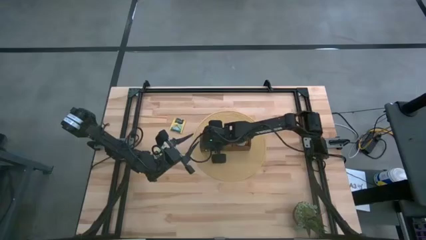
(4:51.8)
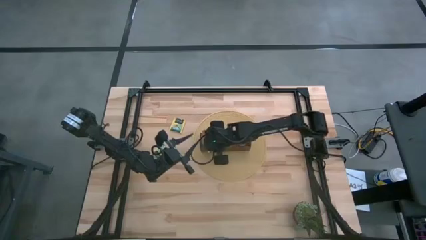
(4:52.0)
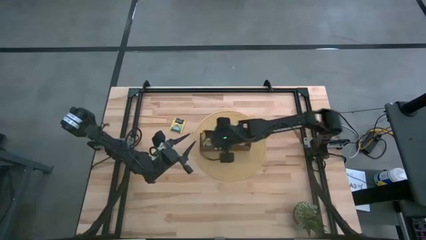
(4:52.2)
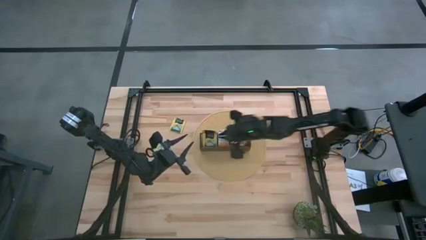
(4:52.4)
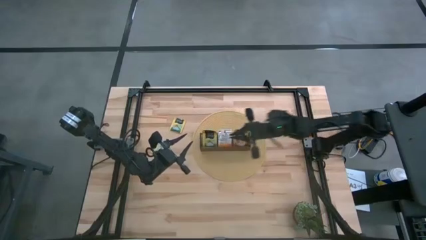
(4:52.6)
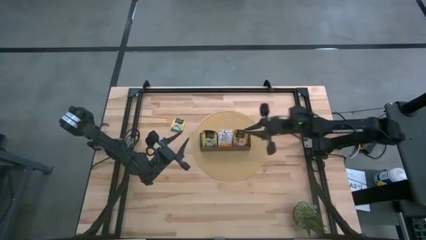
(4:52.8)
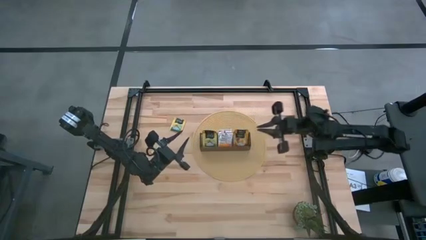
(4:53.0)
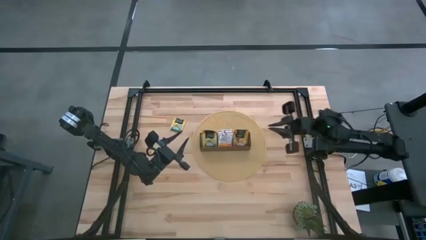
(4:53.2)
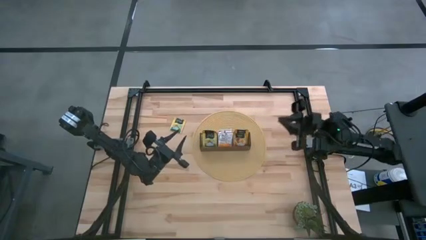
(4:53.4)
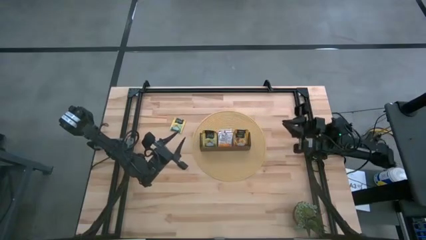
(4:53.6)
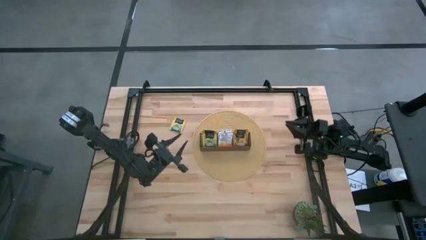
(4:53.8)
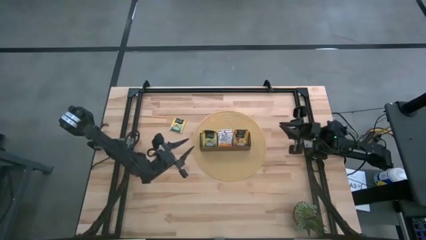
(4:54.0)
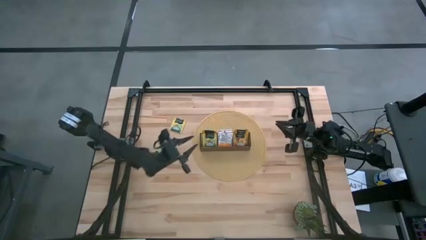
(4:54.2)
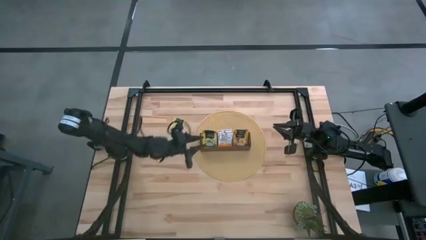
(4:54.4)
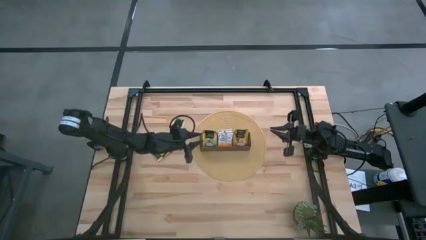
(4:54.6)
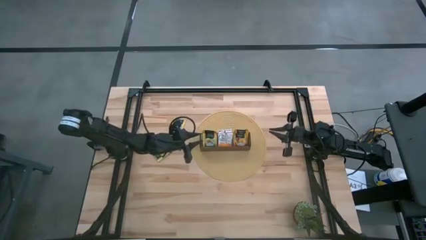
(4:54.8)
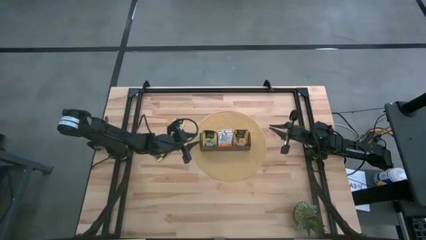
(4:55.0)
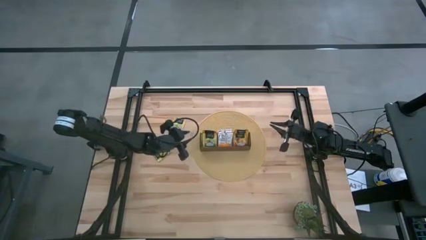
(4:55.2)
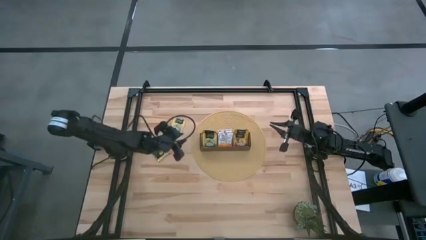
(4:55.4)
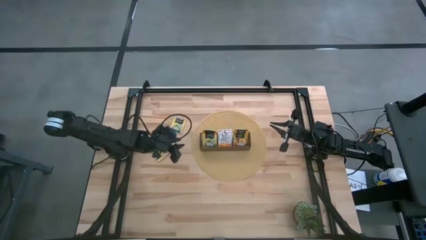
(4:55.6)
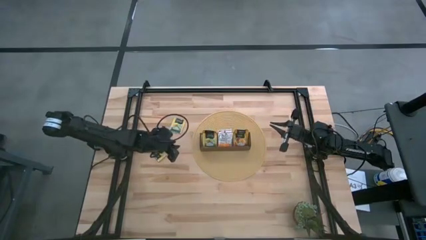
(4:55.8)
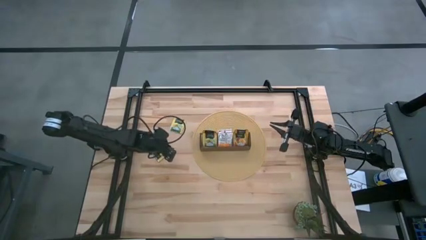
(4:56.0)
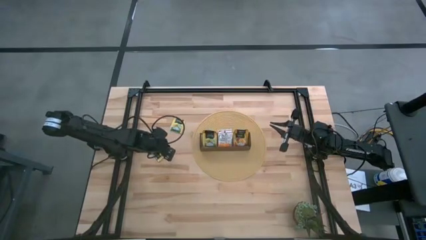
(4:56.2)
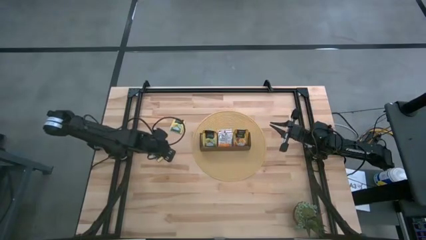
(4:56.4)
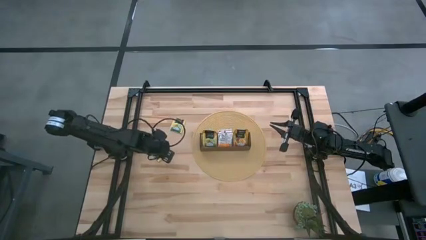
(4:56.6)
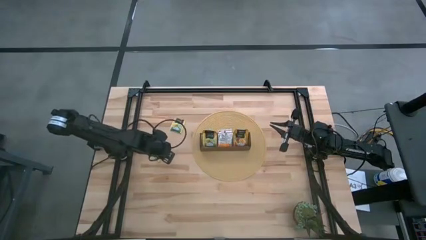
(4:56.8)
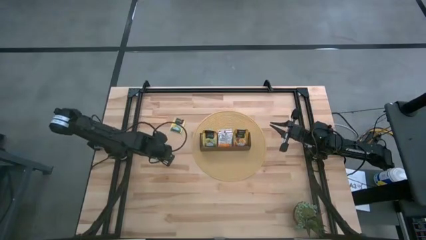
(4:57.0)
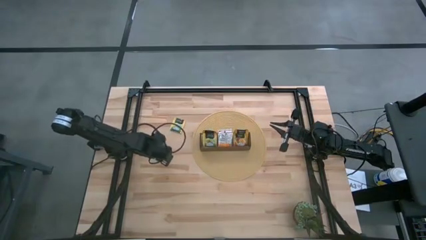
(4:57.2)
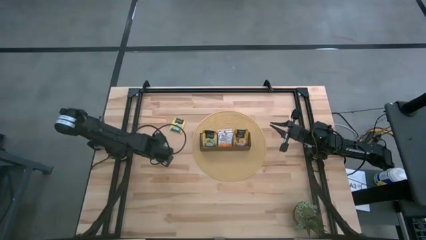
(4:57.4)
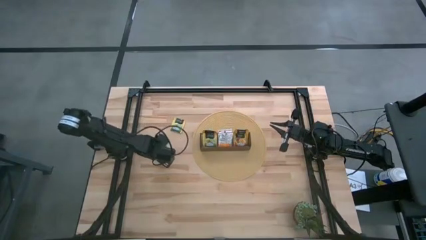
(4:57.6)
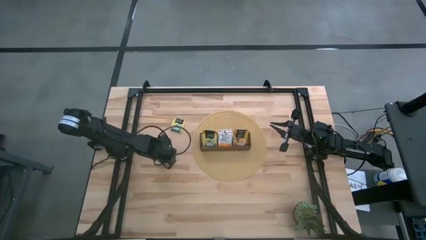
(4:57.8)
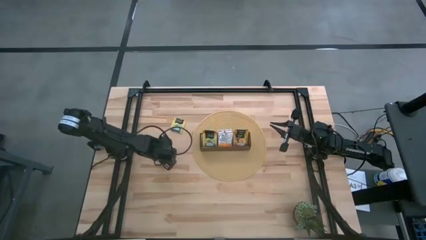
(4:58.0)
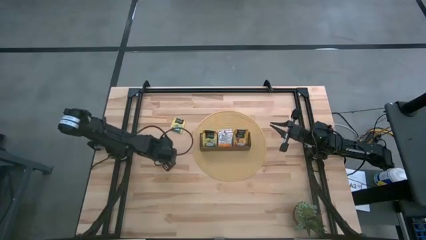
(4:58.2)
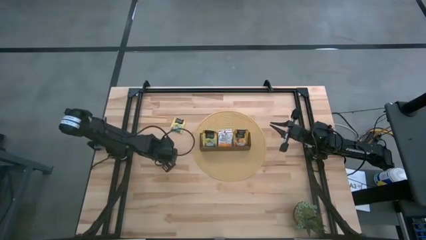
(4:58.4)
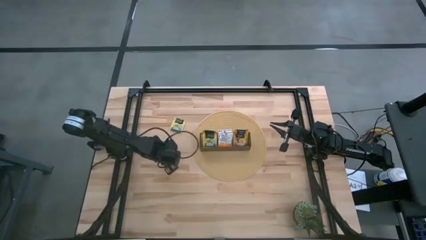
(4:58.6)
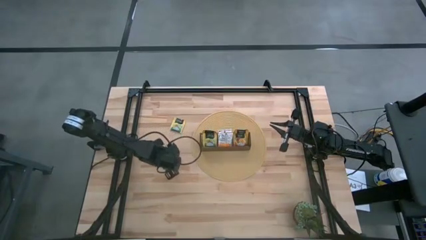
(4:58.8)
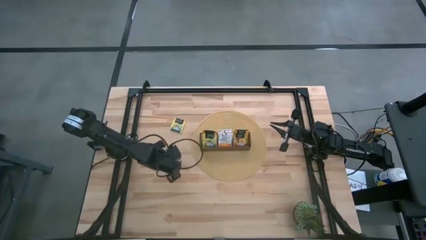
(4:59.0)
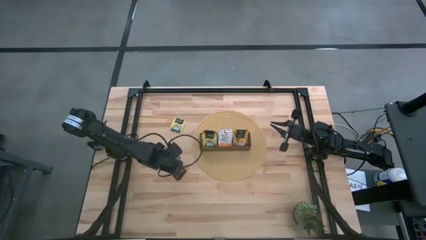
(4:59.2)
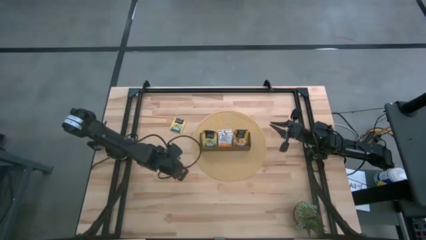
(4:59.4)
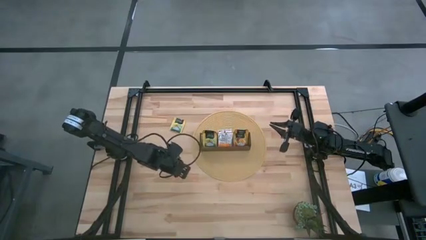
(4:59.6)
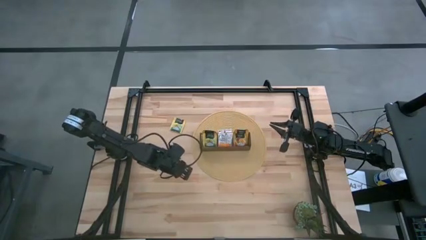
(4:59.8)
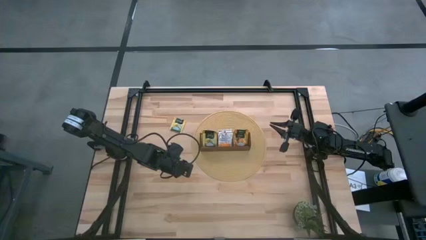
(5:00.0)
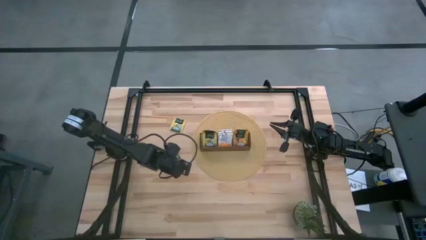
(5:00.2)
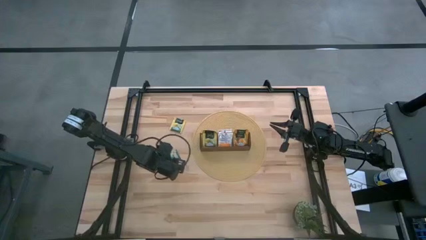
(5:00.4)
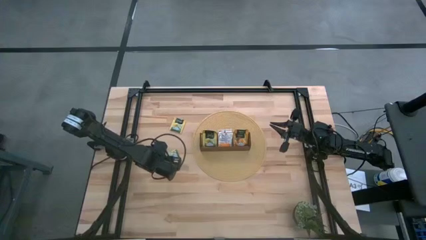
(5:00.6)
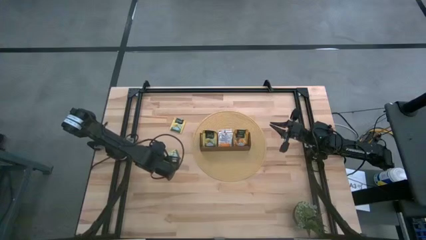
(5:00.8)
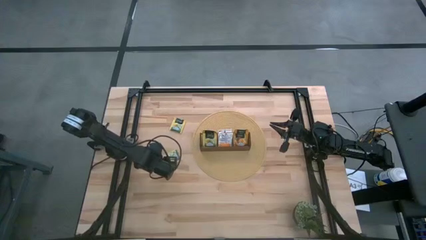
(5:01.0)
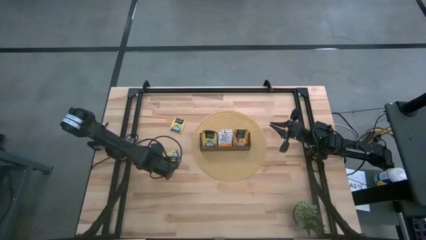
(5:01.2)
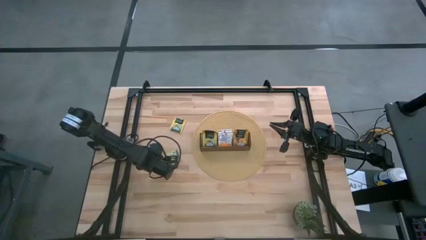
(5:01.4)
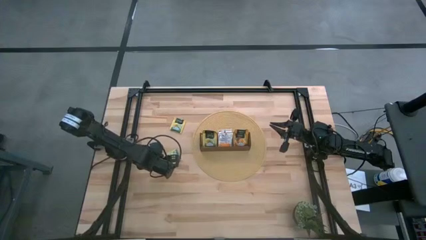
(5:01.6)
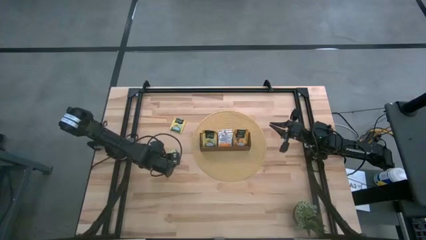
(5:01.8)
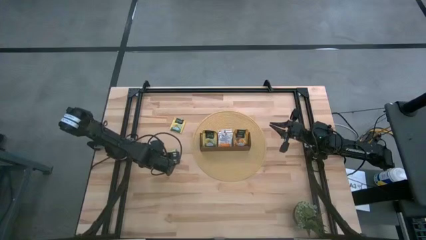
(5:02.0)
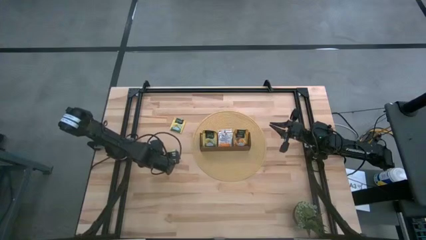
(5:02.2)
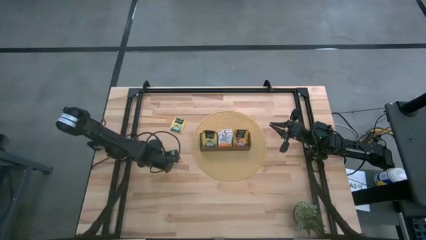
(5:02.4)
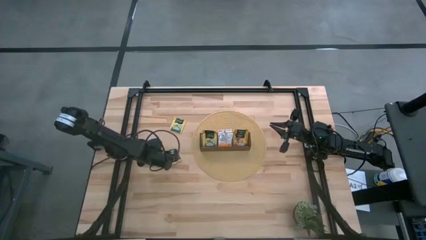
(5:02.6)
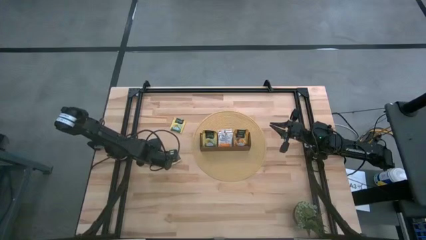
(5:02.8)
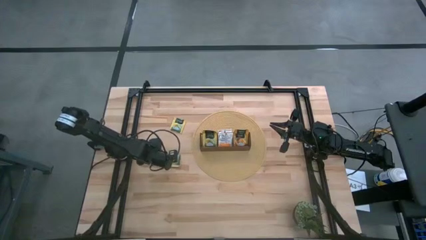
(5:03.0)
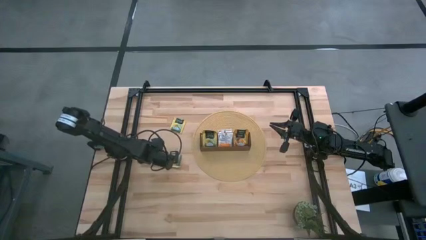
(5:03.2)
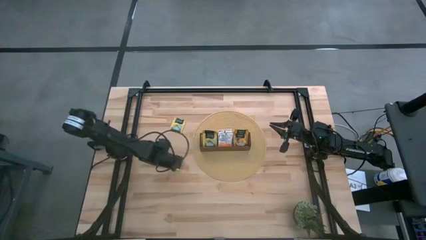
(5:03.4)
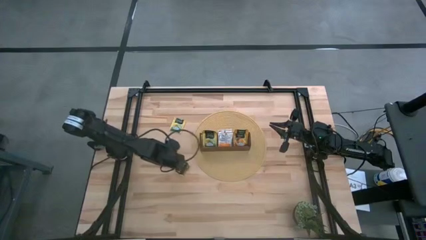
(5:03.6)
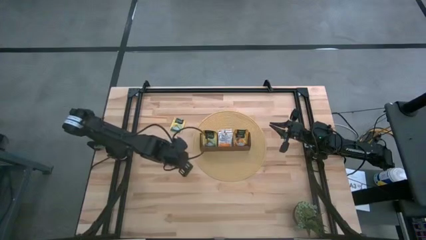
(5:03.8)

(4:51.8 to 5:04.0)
Task: Pick & Place Tea
Put the yellow tea bag into the left section of the wooden organizer

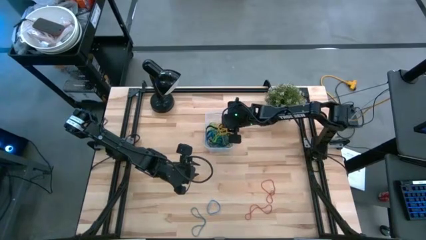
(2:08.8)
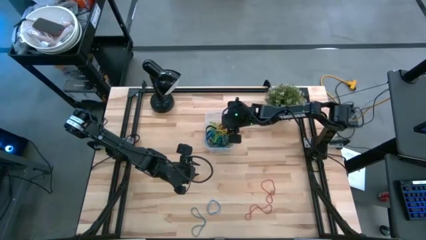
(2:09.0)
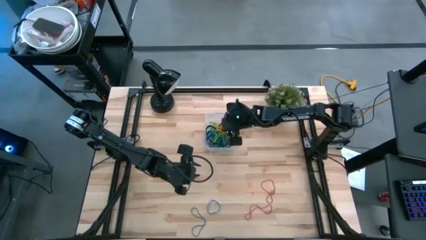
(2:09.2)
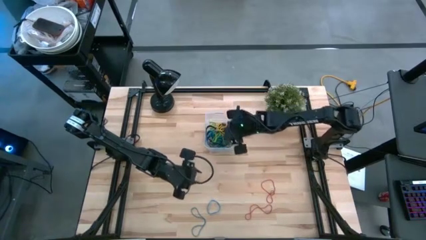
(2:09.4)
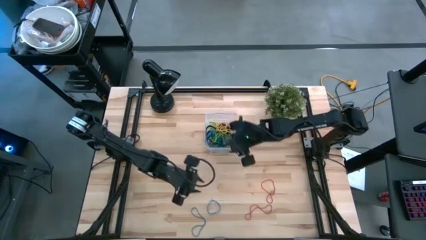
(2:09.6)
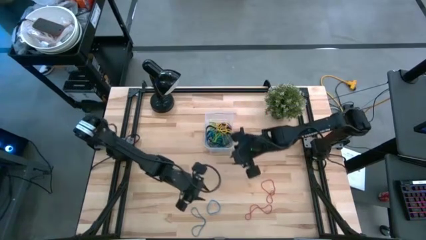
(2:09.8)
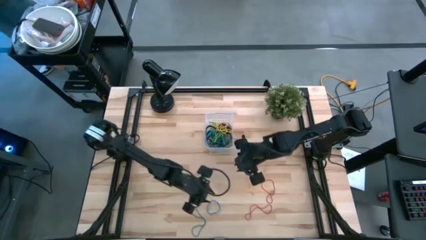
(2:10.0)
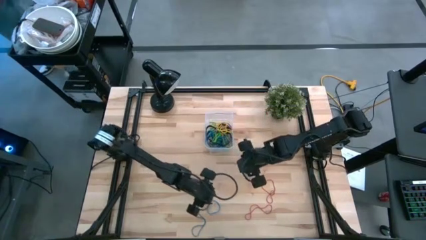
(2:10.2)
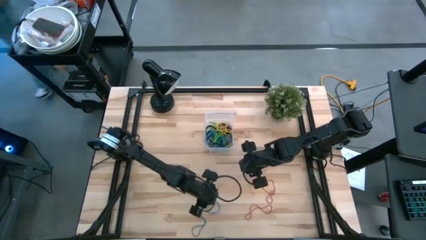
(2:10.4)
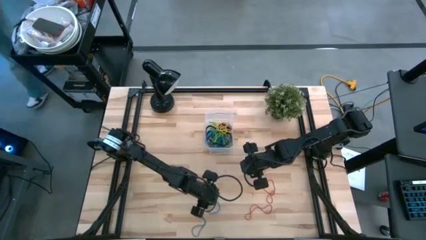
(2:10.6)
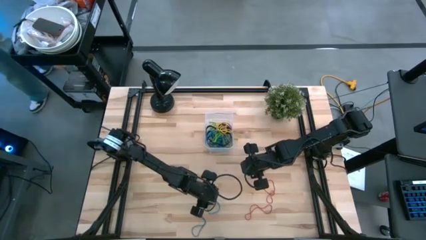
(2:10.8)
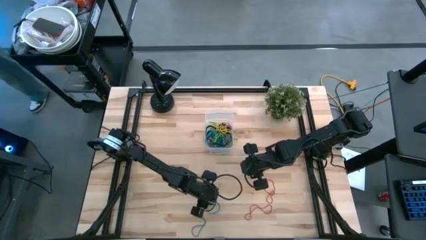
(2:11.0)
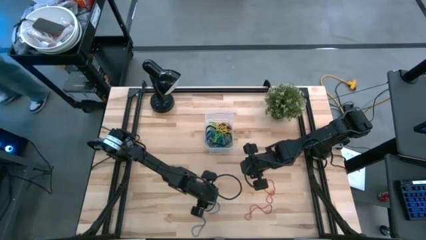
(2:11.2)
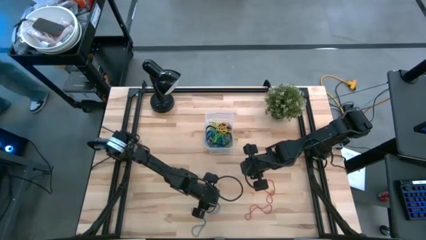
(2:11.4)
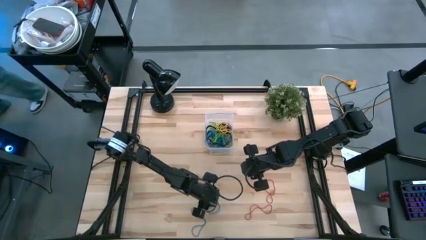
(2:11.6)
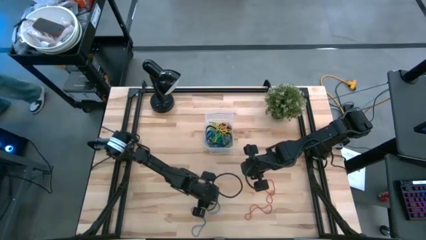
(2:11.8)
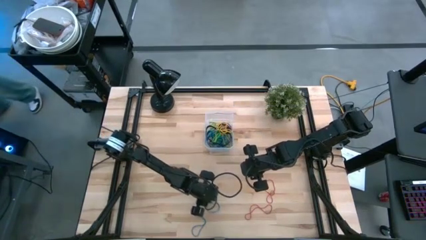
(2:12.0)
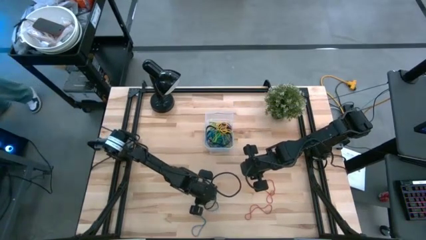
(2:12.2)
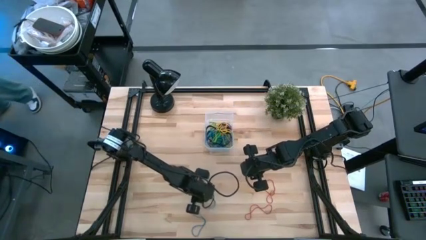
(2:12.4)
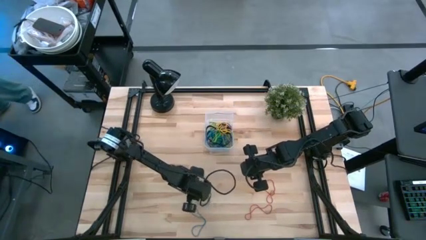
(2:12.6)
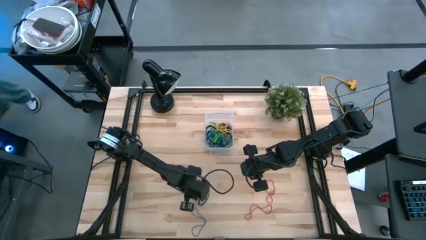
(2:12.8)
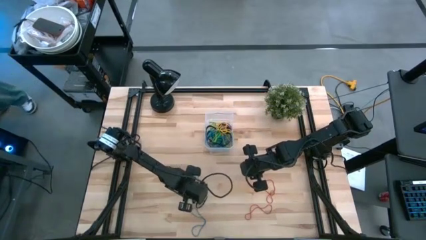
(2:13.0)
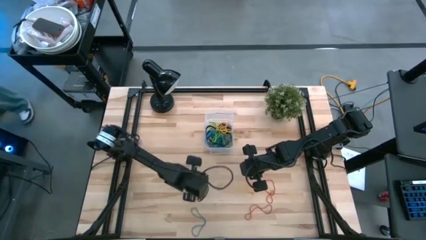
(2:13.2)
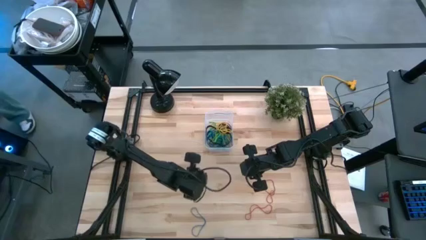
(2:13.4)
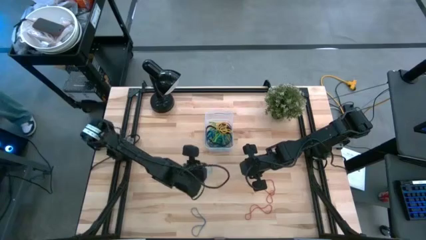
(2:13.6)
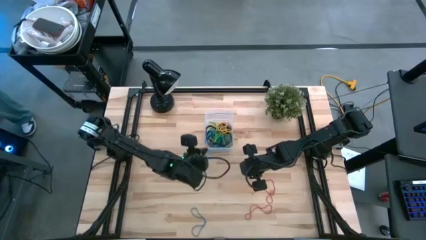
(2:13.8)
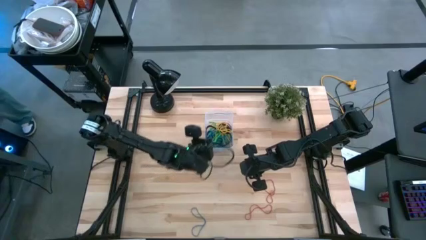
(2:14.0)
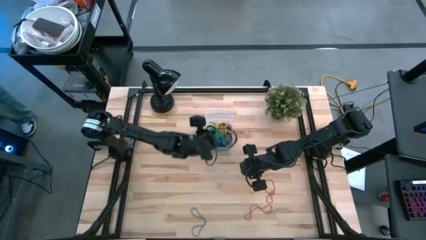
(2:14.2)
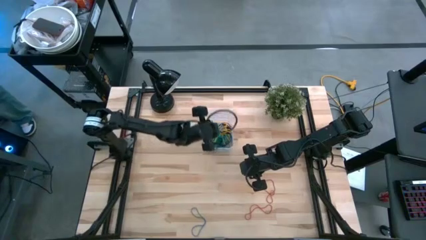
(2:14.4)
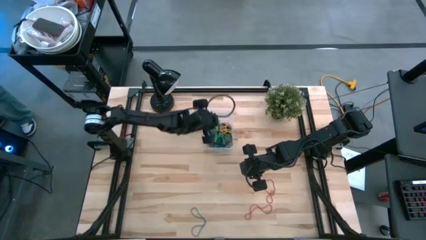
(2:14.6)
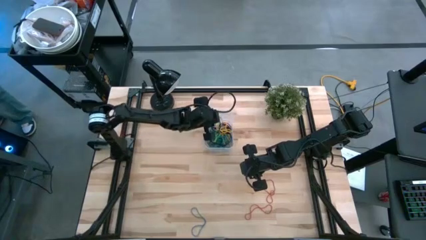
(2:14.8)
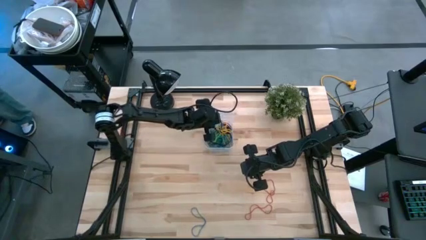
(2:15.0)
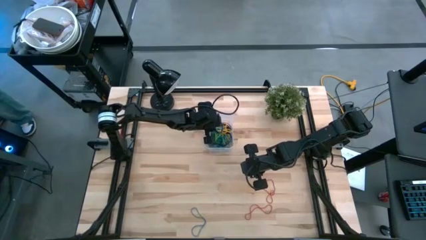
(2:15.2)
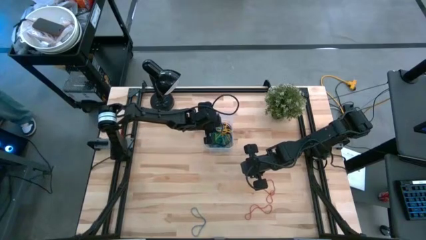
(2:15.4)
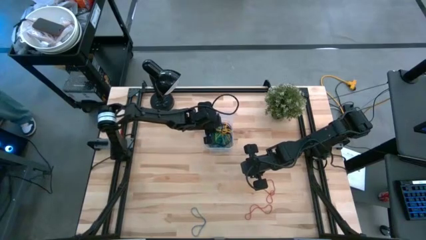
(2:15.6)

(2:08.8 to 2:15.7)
Task: Pick and place rubber bands into bin
Put blue rubberband into the transparent bin
